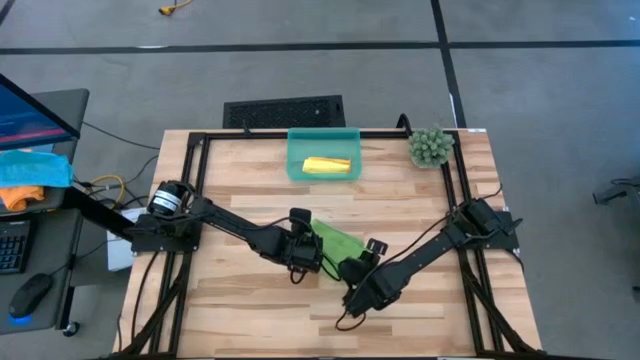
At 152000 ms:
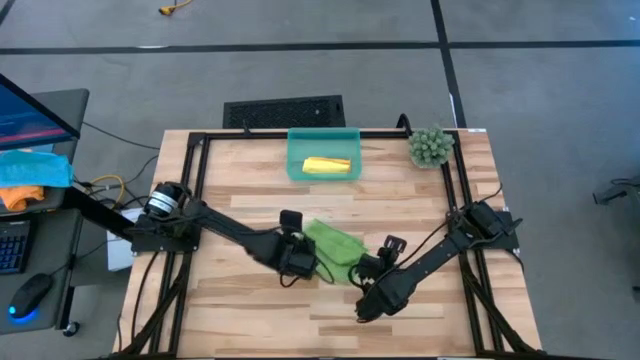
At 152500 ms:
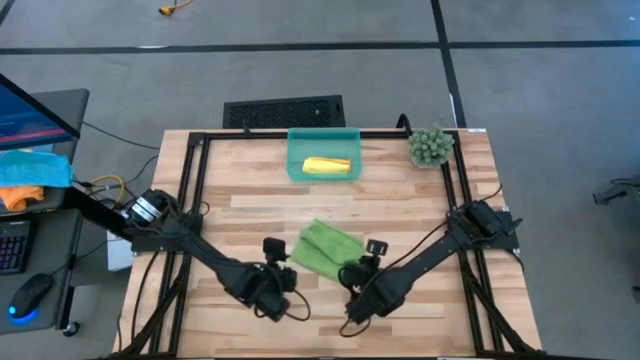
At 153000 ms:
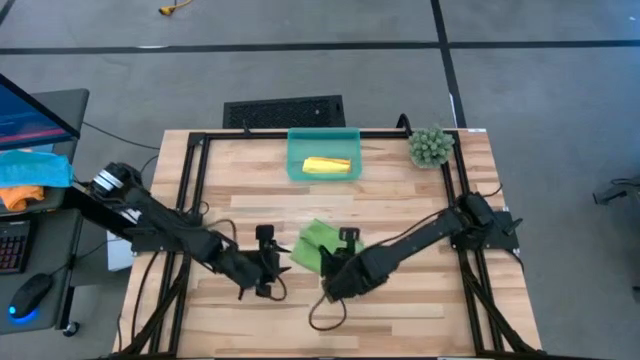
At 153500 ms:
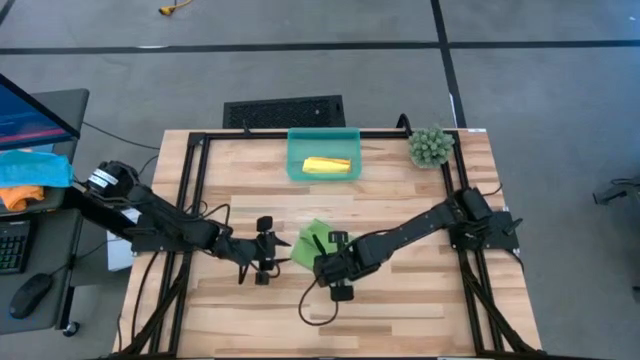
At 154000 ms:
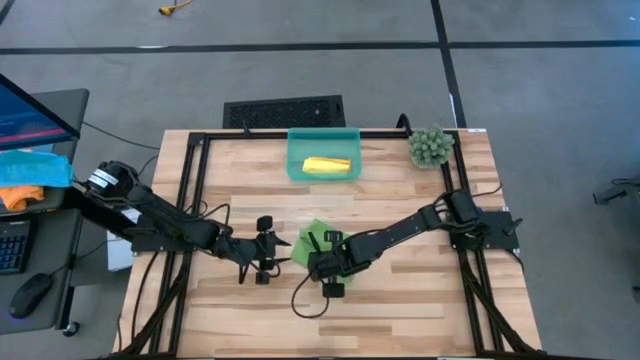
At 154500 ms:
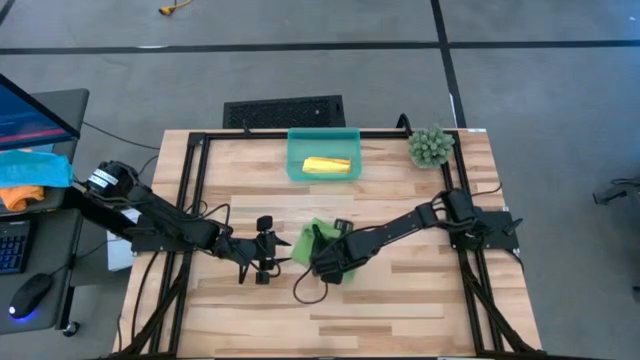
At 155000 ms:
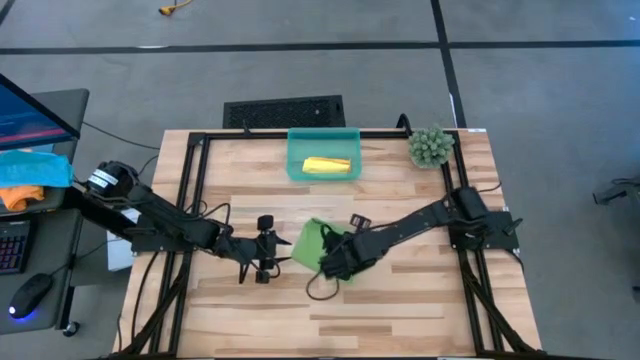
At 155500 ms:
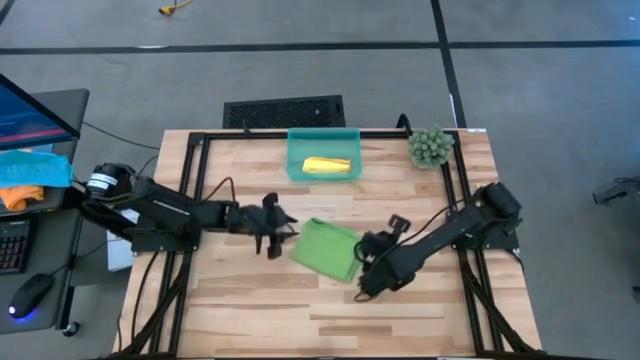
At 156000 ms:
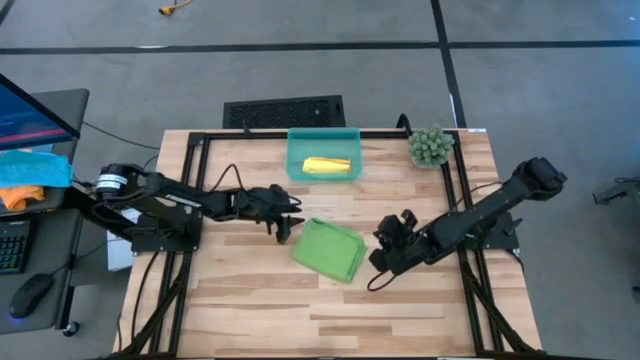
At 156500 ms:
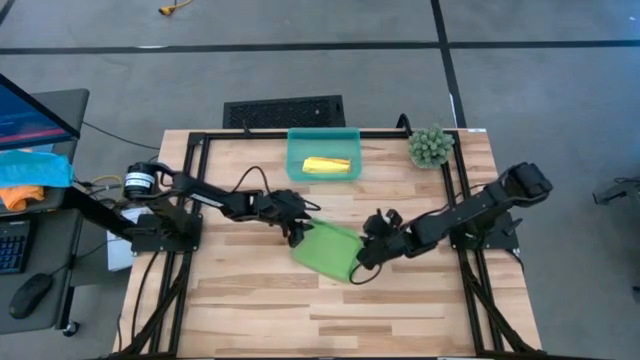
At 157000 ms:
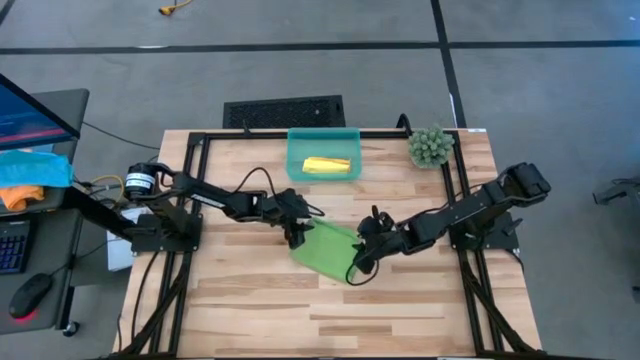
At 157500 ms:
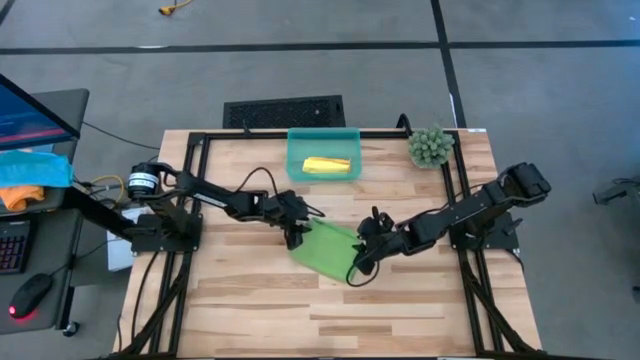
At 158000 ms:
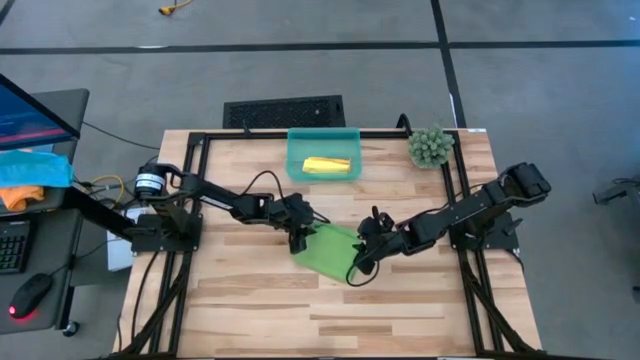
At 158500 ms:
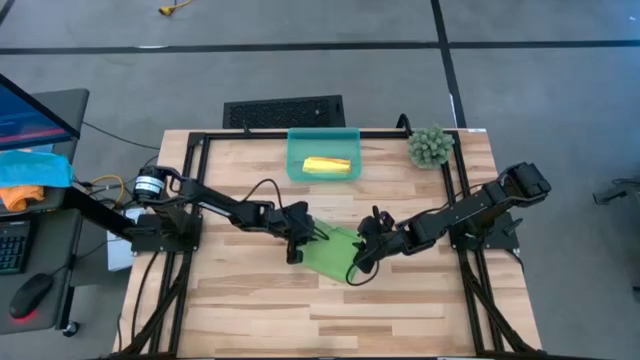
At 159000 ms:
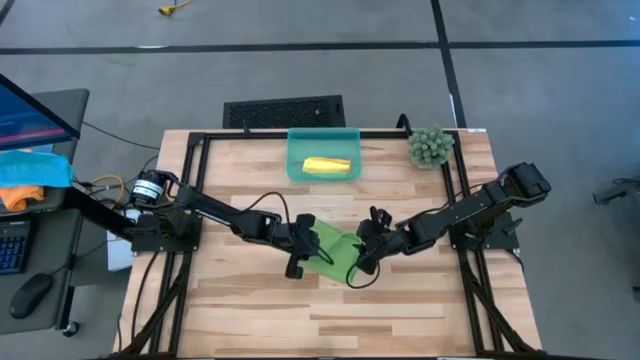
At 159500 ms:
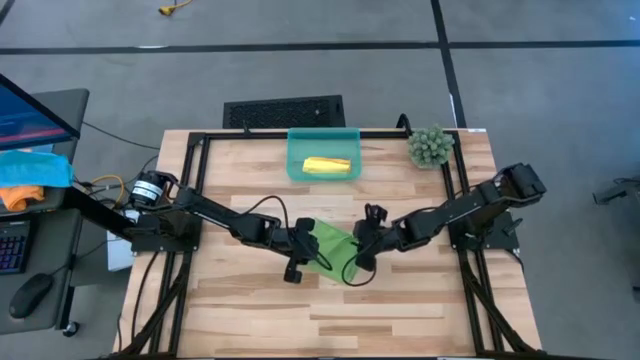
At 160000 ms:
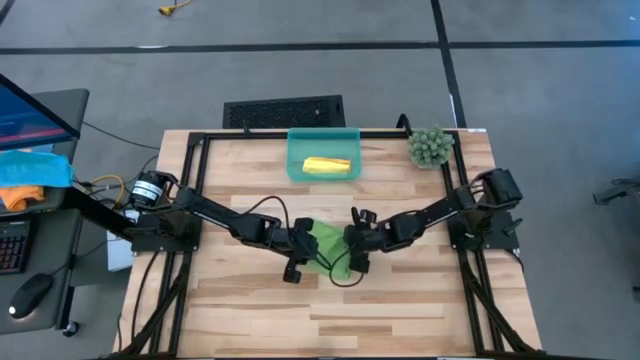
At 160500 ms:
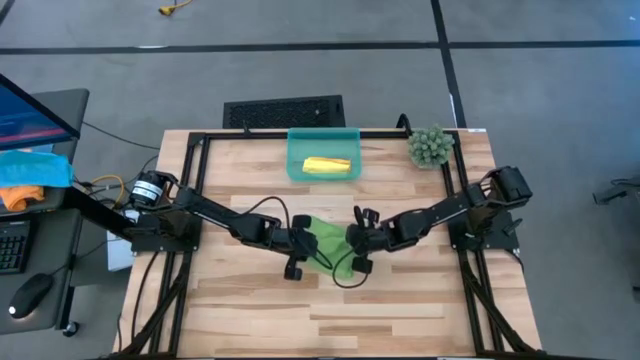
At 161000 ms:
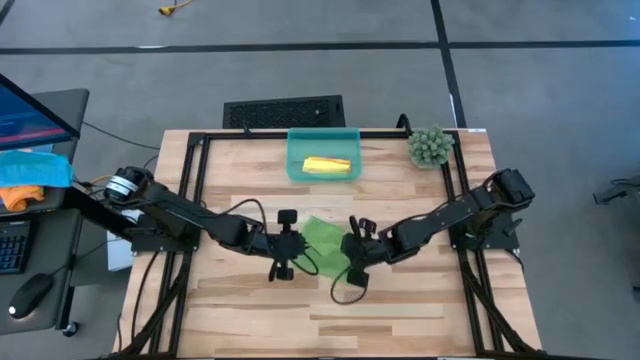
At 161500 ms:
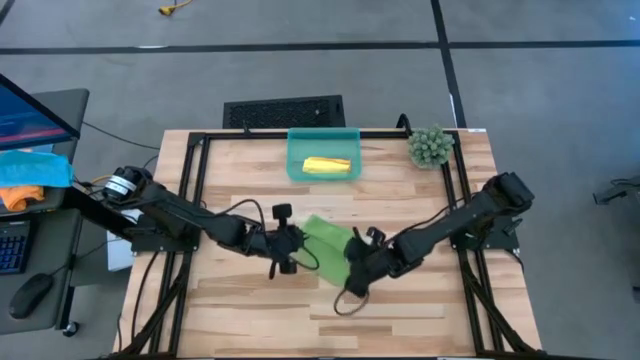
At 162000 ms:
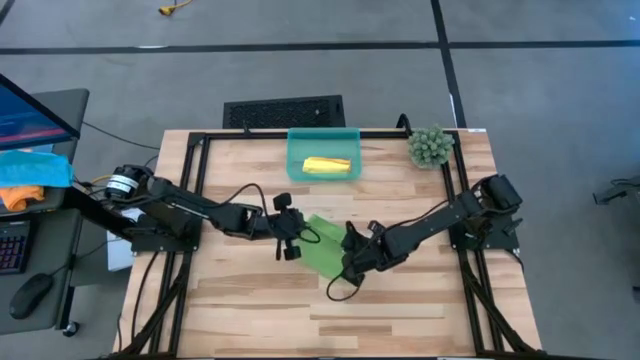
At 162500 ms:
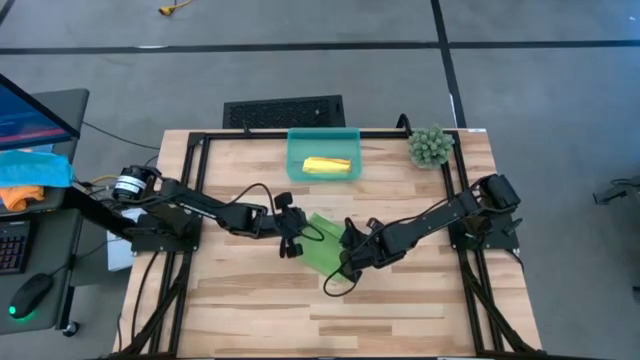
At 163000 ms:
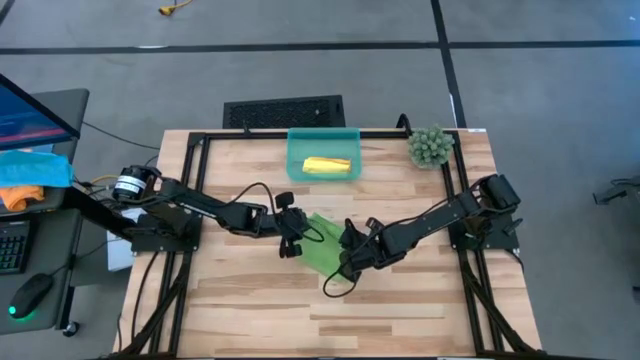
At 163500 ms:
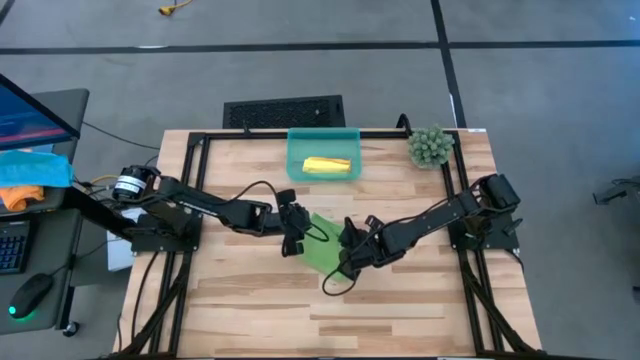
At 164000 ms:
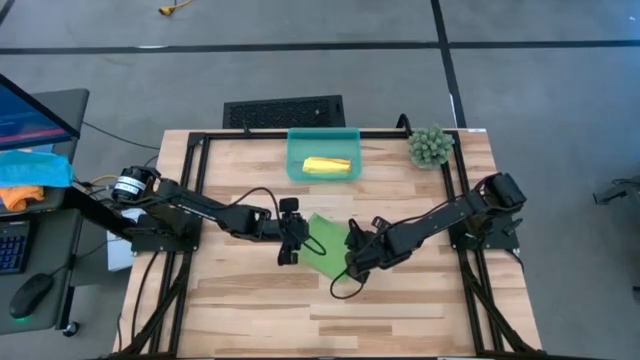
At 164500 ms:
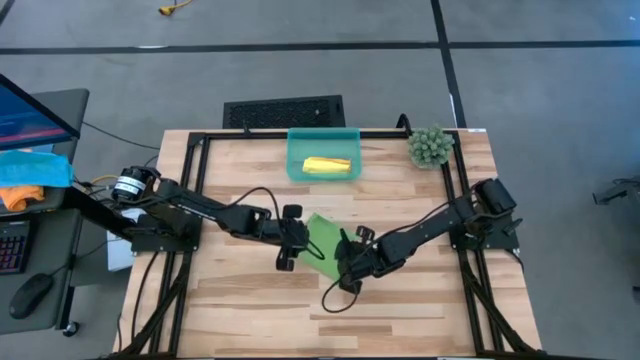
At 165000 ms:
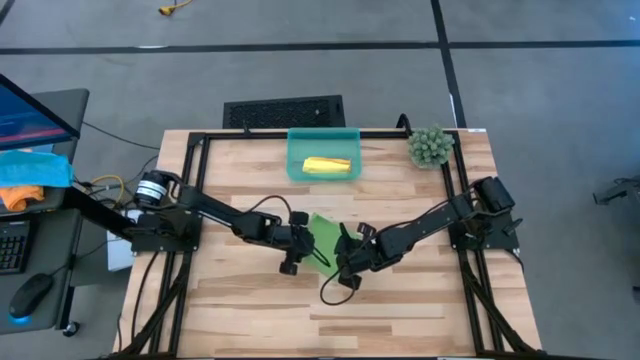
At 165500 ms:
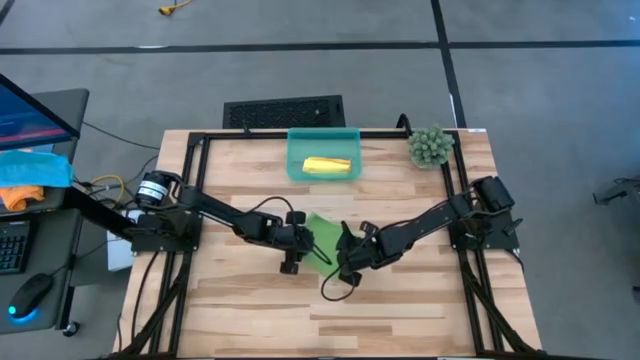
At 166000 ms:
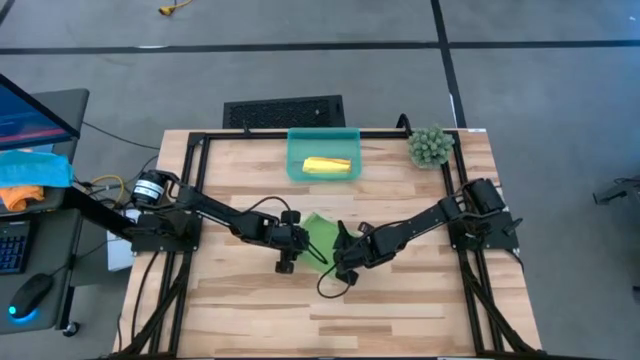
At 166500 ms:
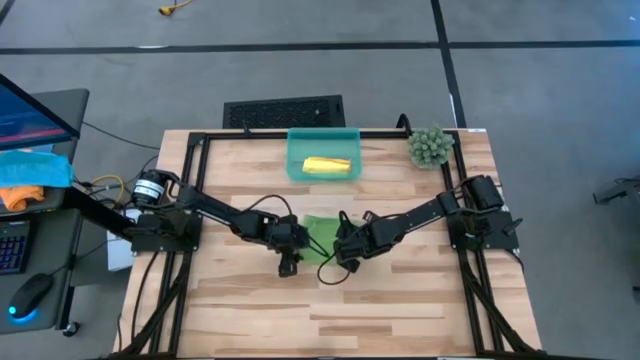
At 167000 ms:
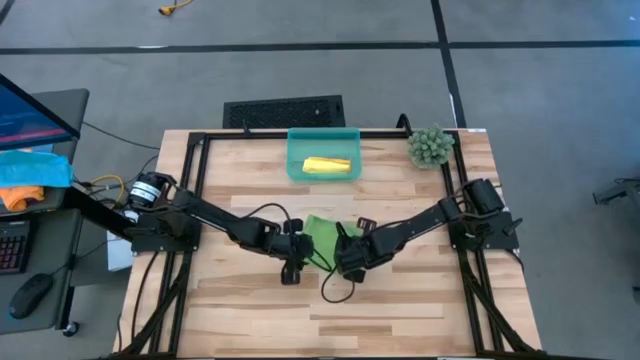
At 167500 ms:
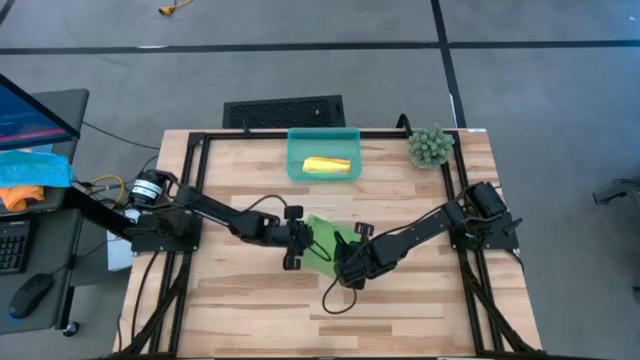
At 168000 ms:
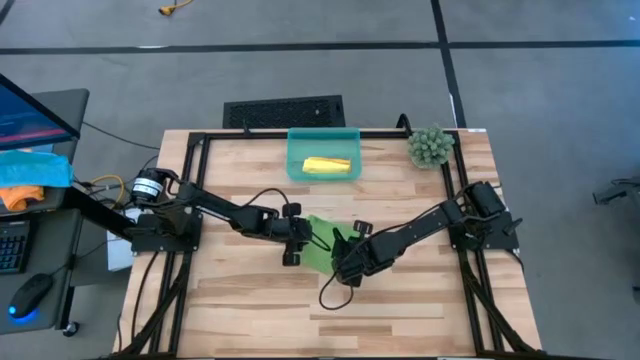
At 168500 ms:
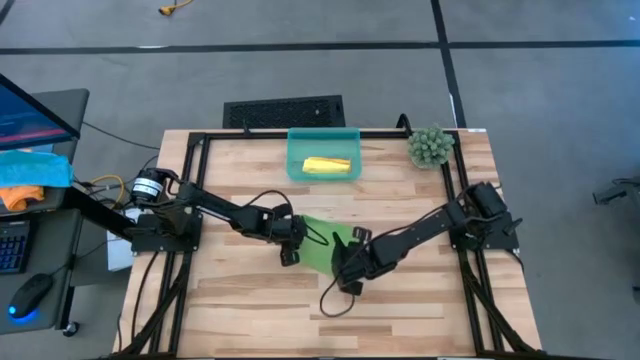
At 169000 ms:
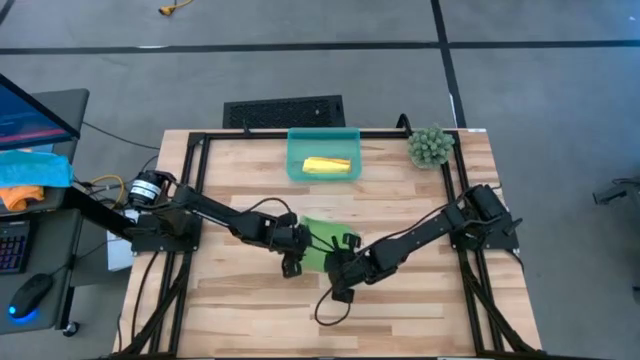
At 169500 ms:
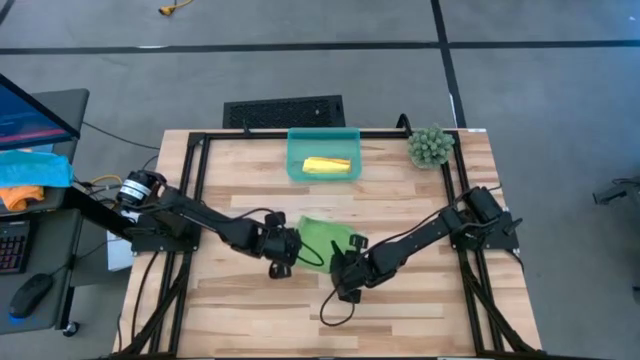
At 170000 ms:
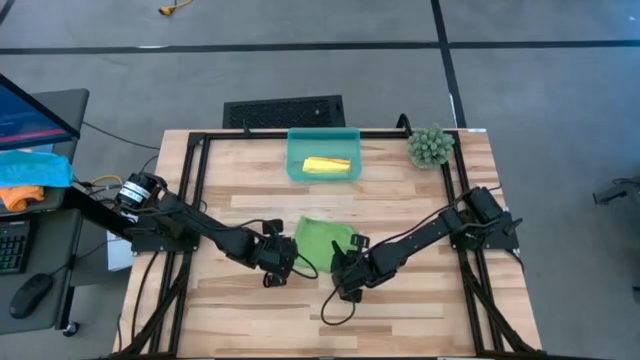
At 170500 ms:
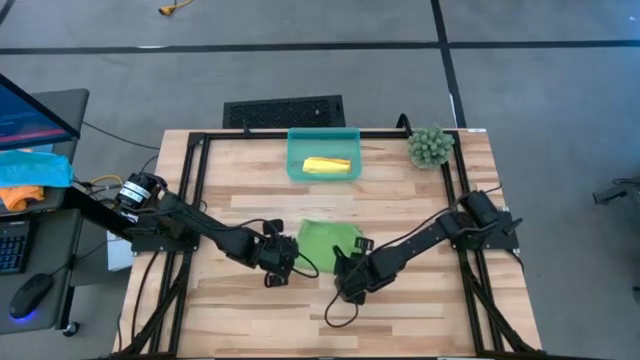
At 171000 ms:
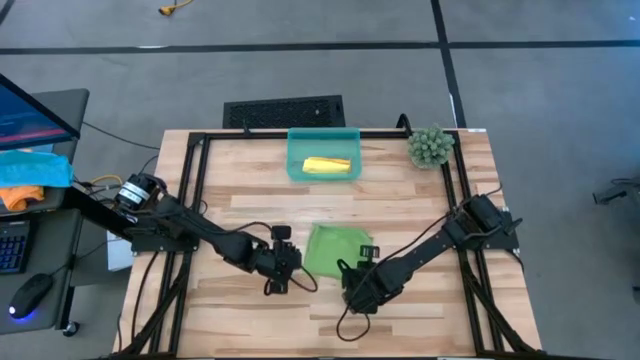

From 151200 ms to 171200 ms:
Task: Roll microfiber towels into tight, uniform cylinder then place into a basket
Fold the green microfiber towel

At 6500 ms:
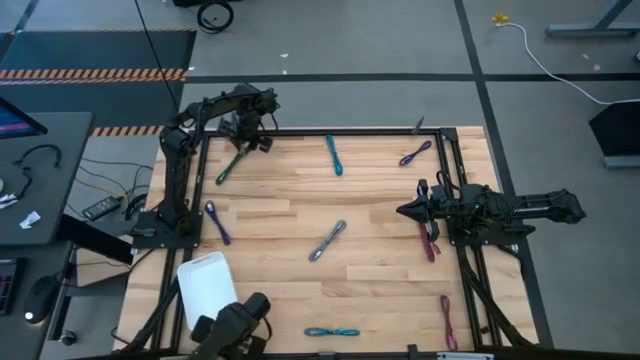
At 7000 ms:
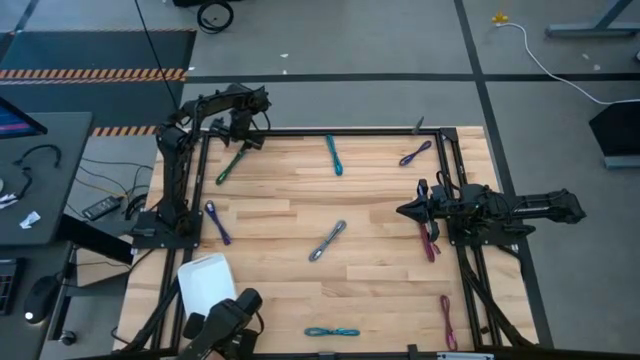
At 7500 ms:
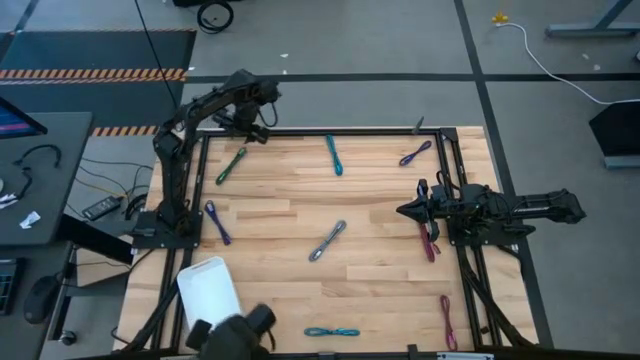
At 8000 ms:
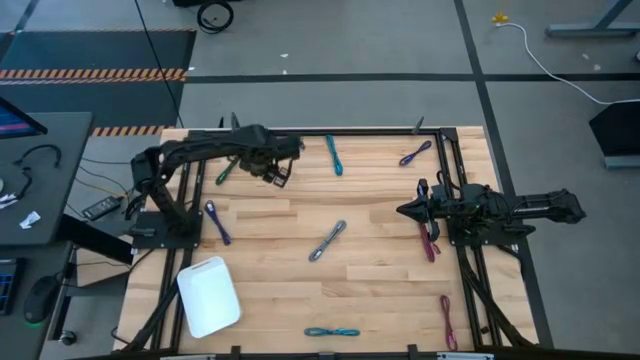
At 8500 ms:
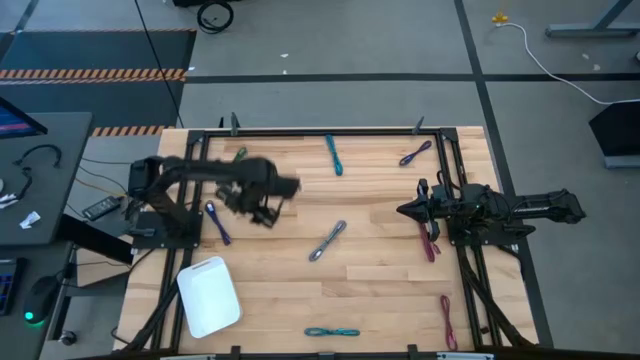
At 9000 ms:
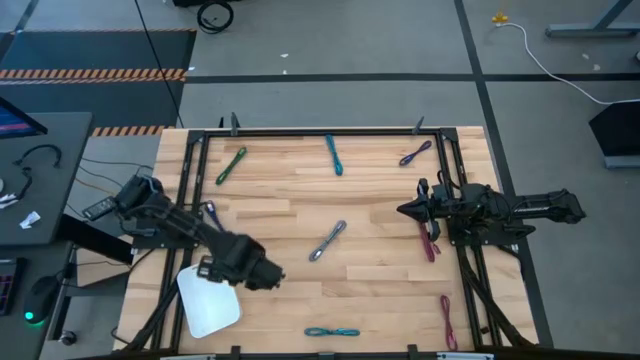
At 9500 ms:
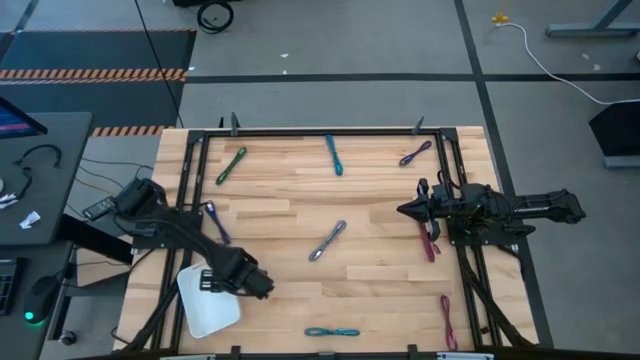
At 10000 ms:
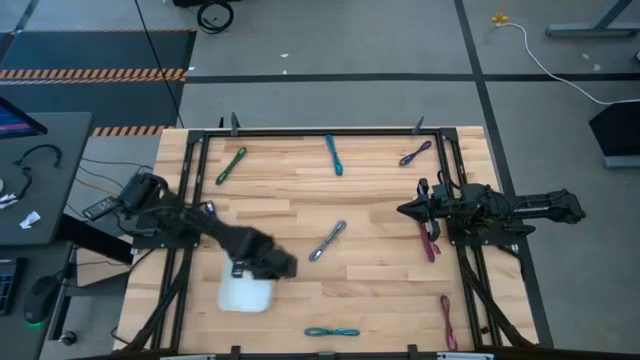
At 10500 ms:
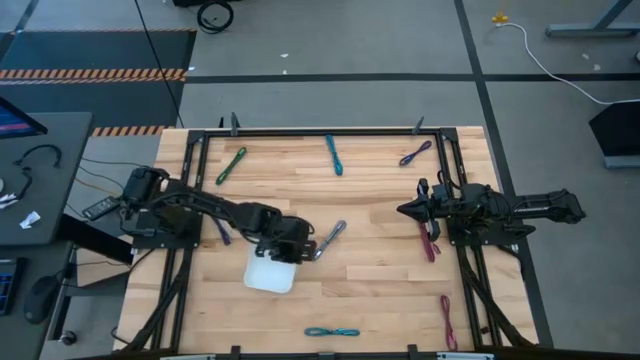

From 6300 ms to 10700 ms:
Task: Pick and place USB-C Cables
Move the white bin to the center of the table
